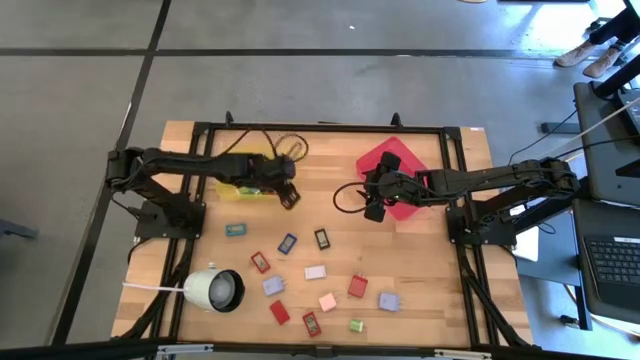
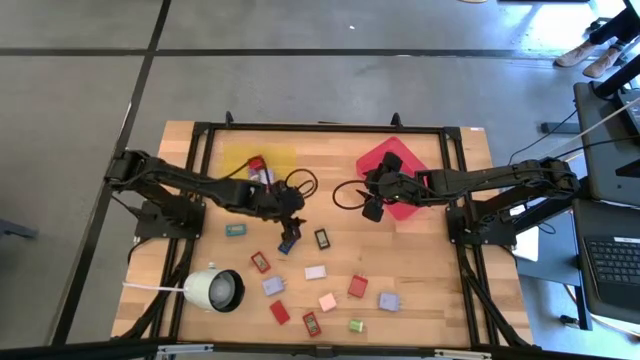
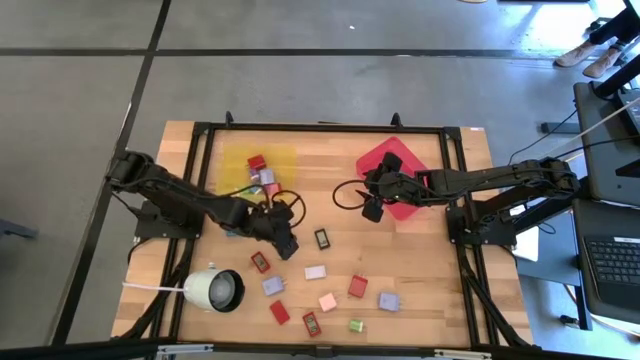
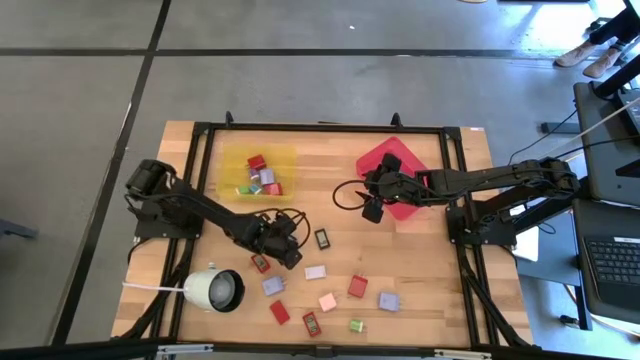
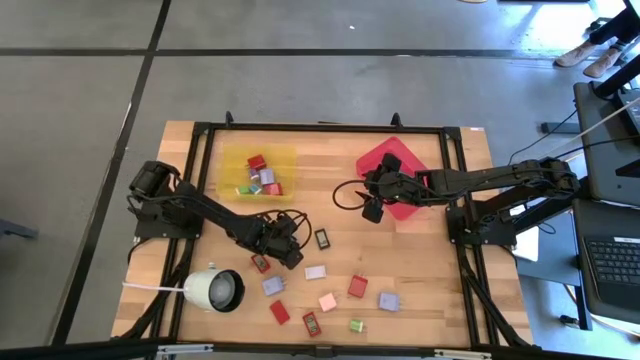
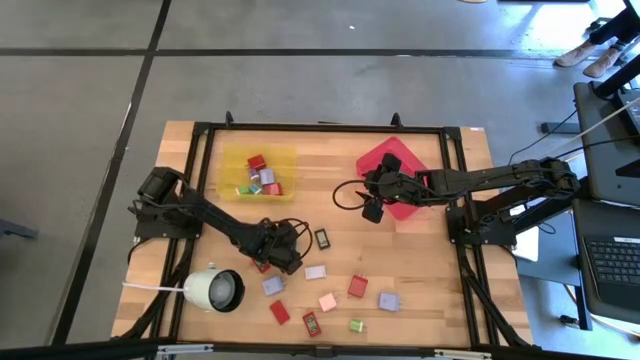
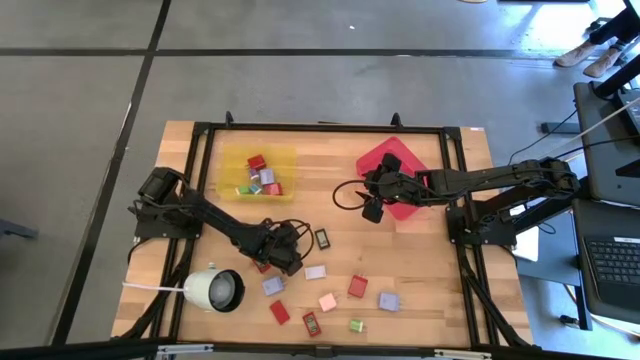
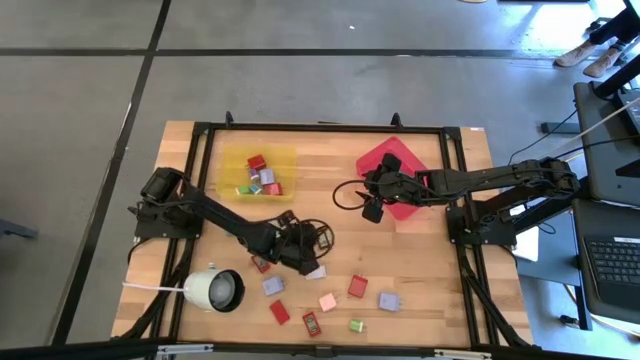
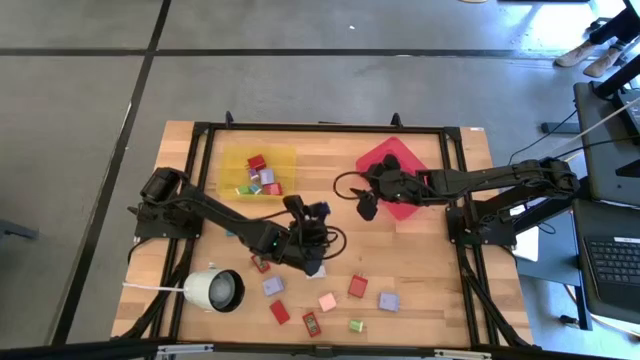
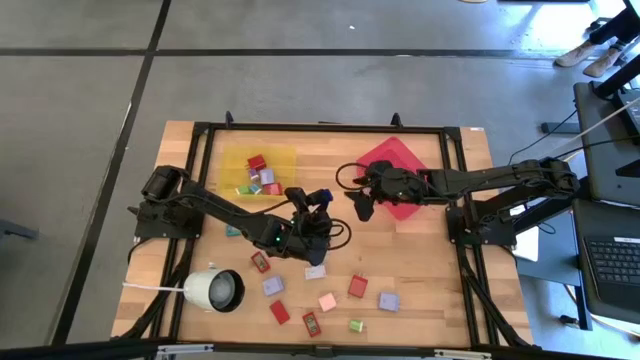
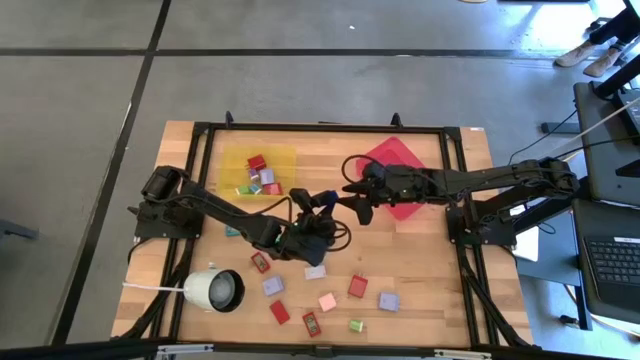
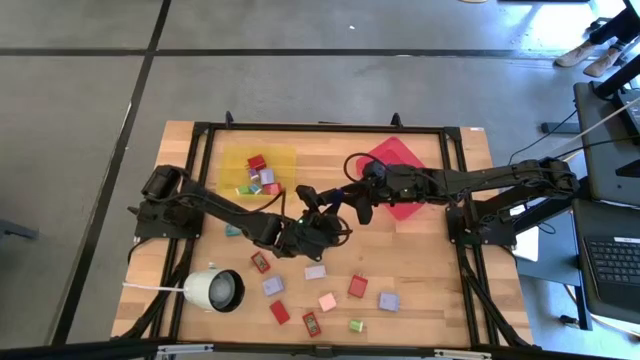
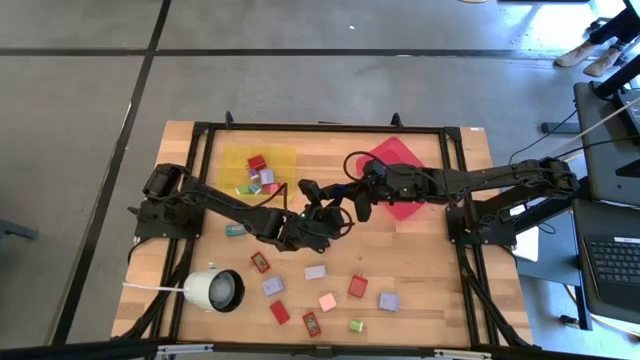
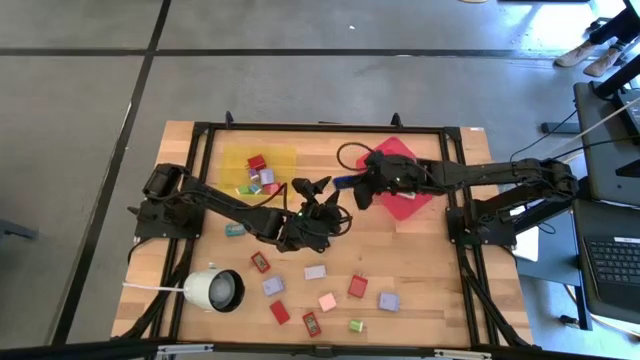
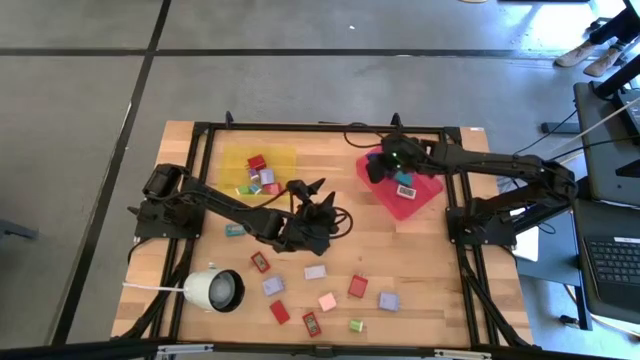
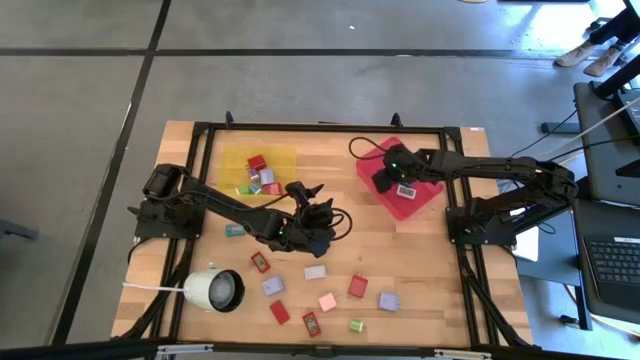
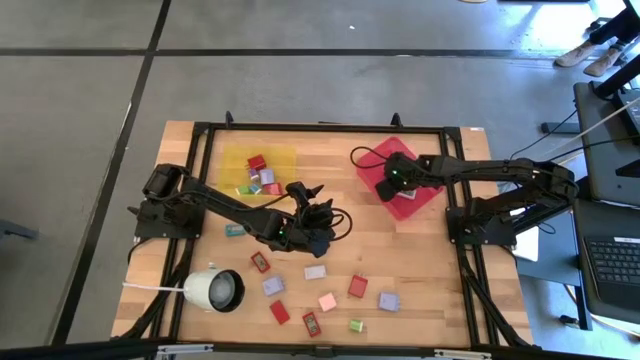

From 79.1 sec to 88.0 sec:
Task: Pick & Place Office items
Put the blue digital clock into the pink bin

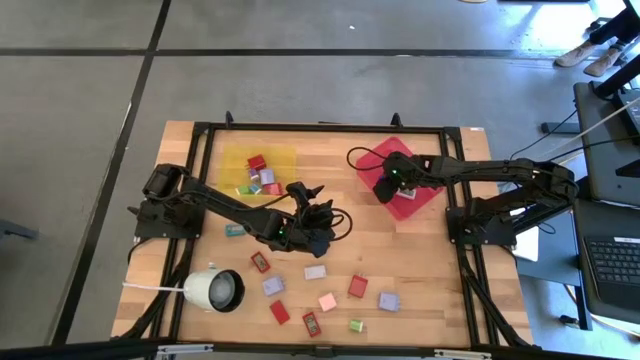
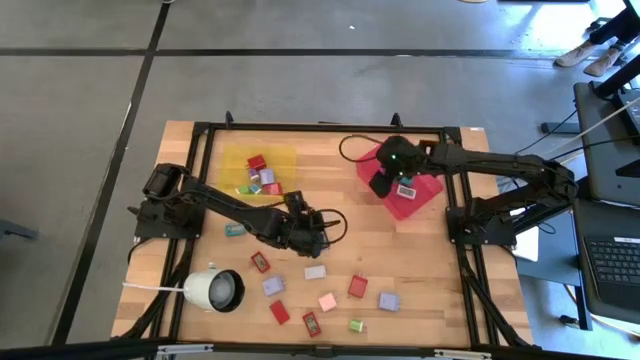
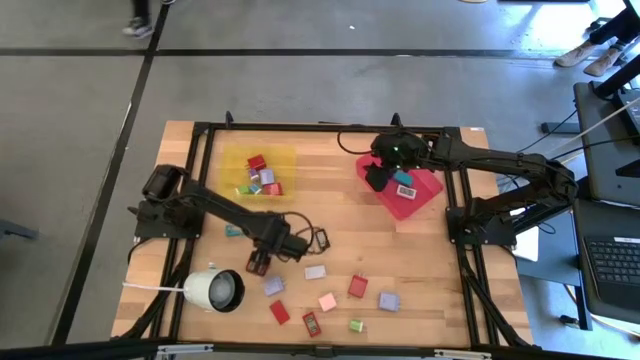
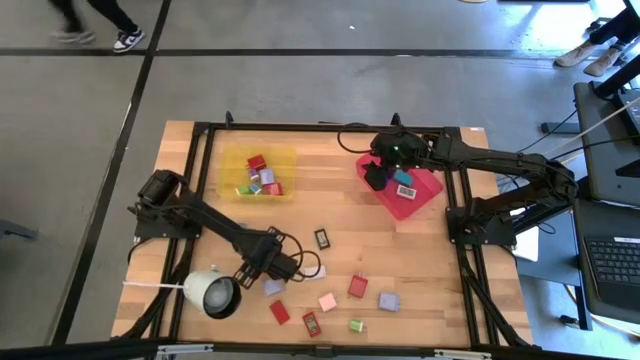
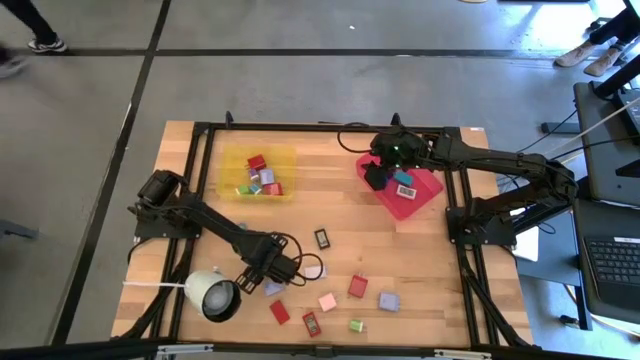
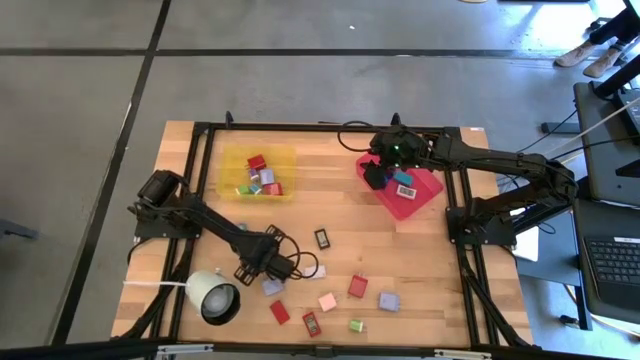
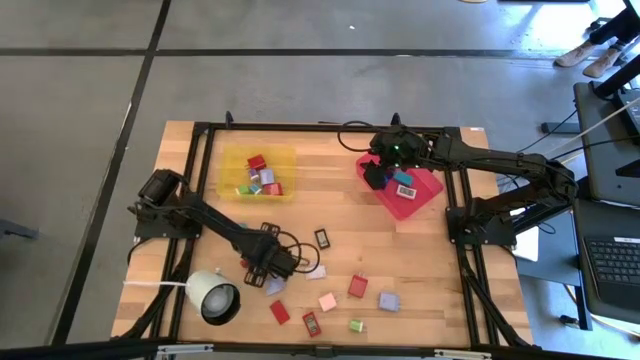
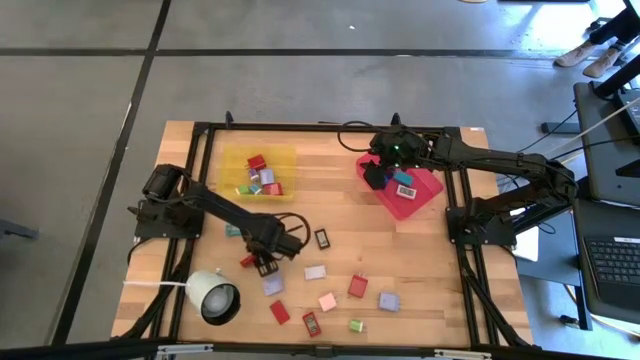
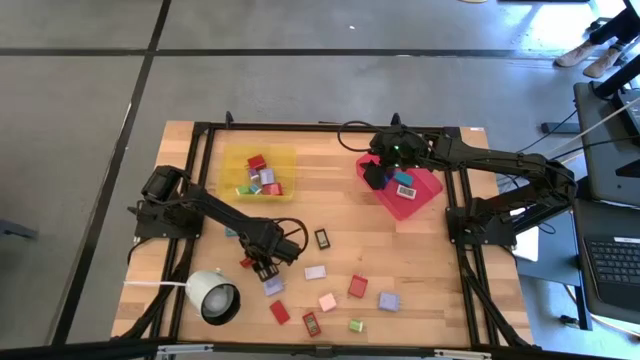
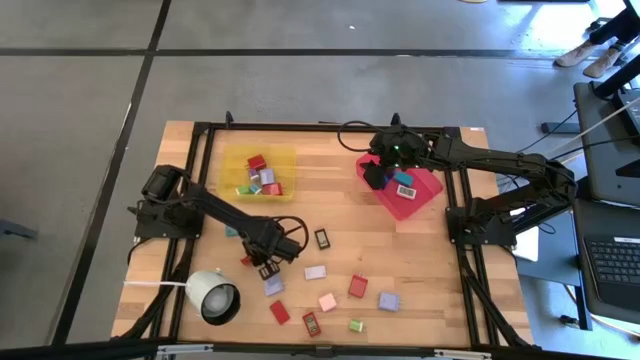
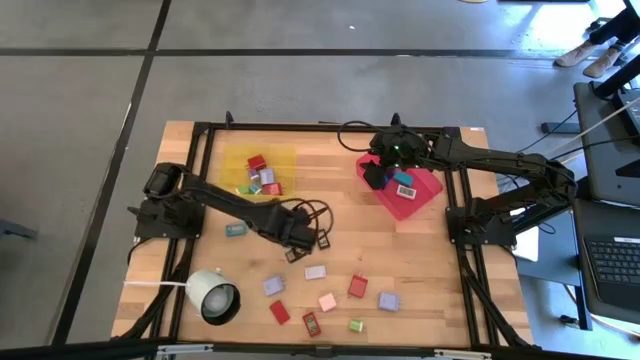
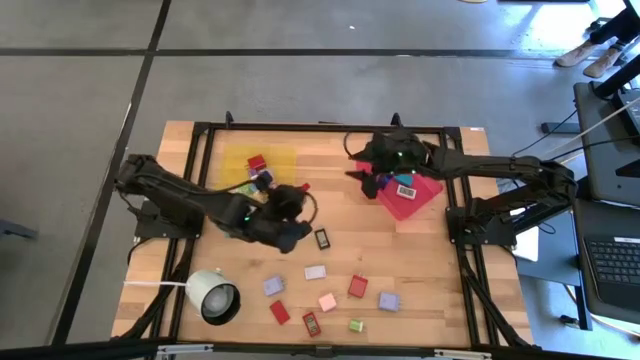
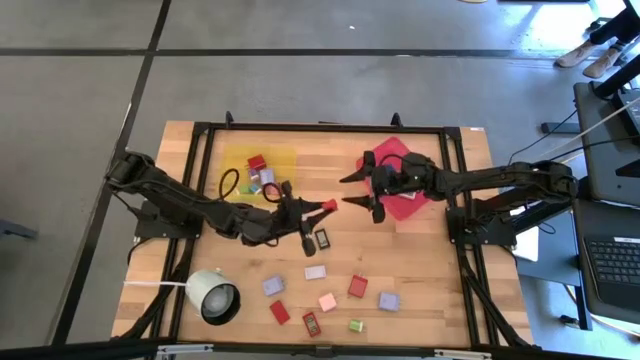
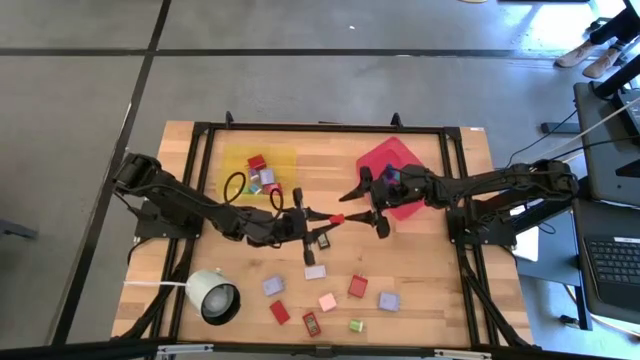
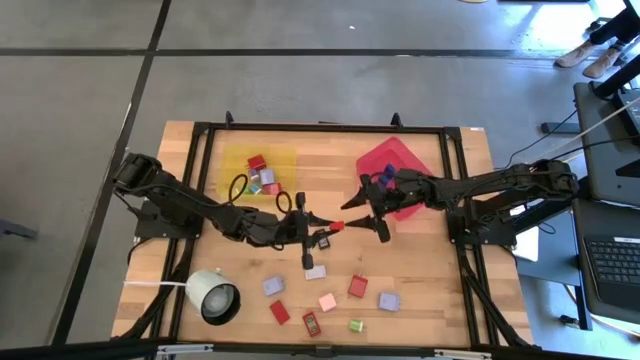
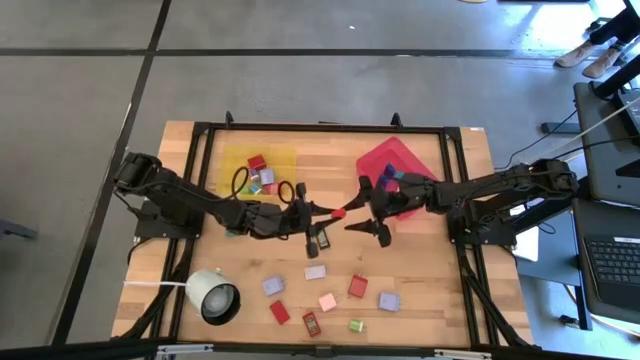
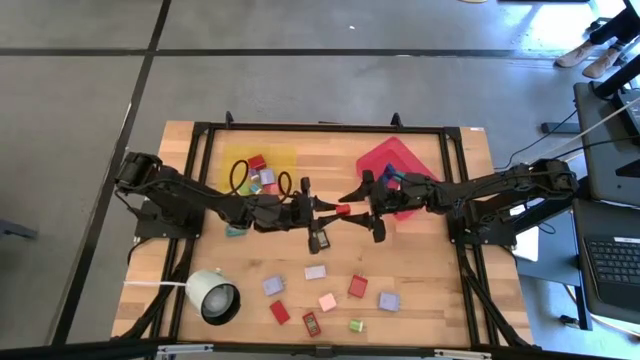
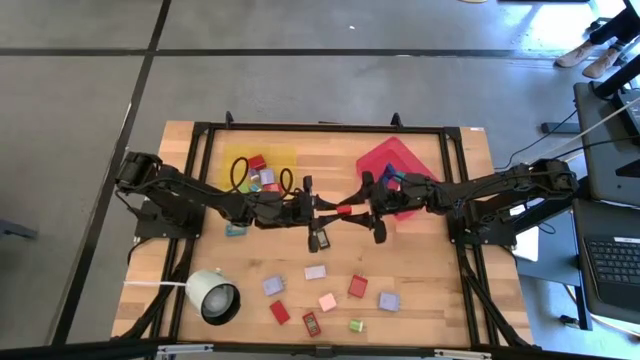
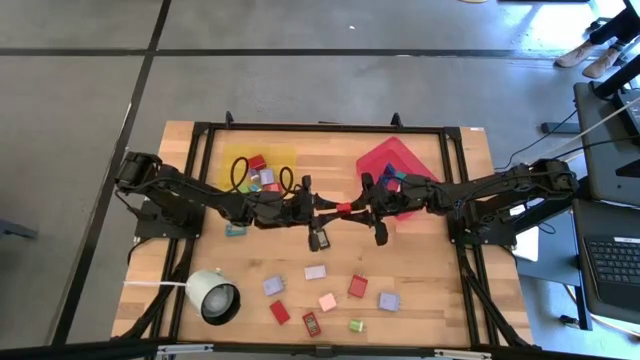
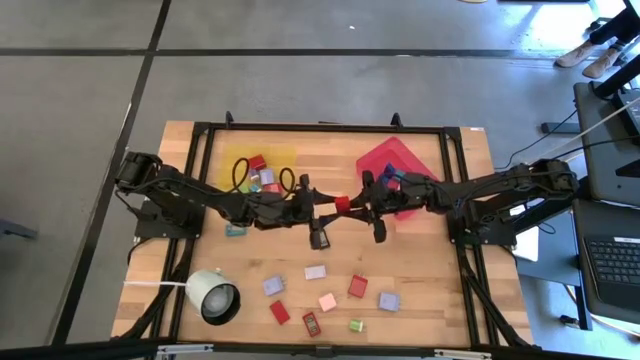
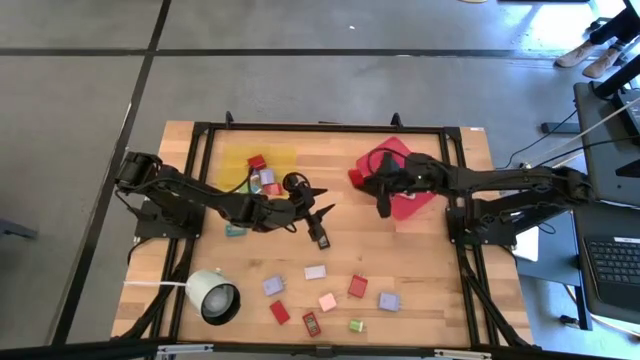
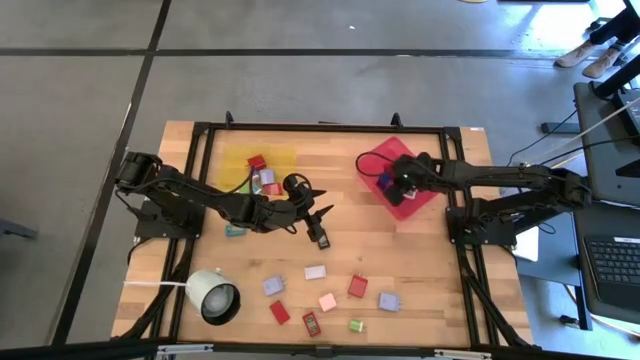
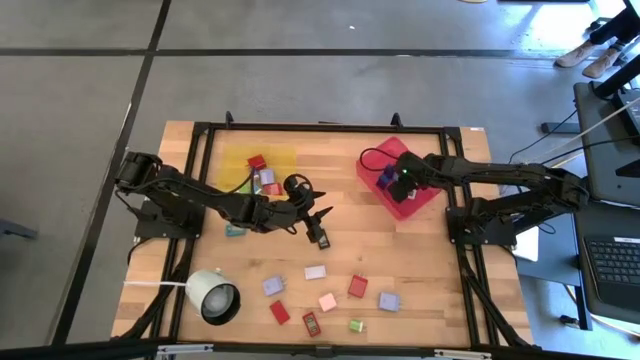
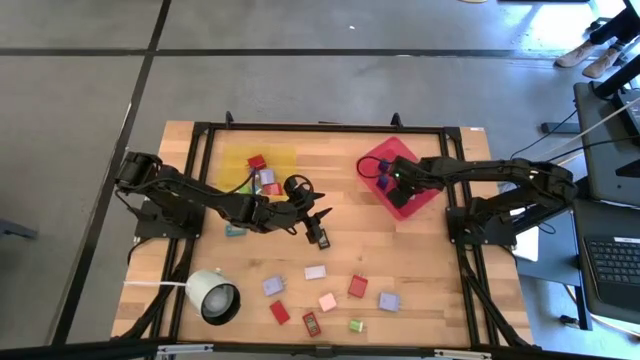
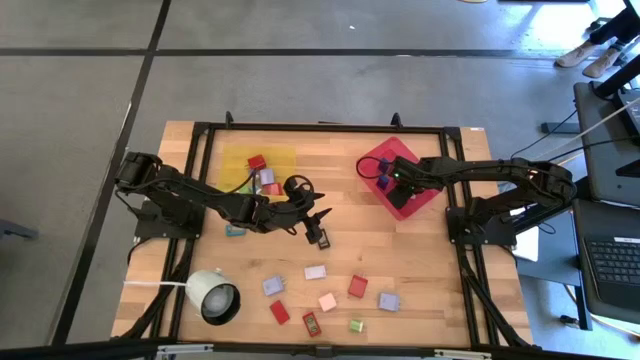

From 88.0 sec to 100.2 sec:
Put the top red digital clock into the pink bin
